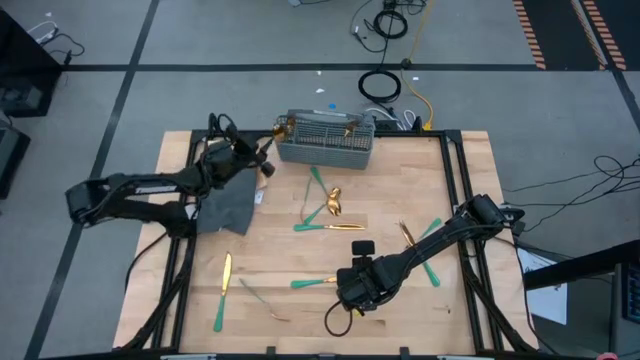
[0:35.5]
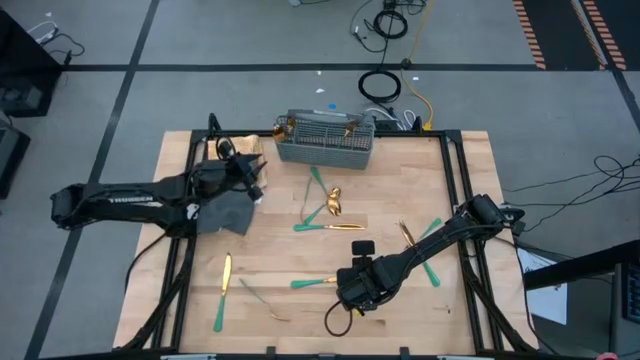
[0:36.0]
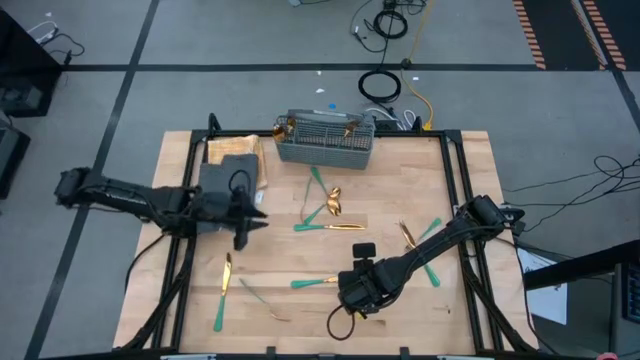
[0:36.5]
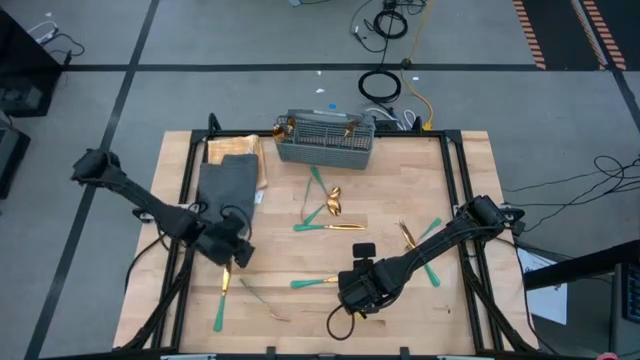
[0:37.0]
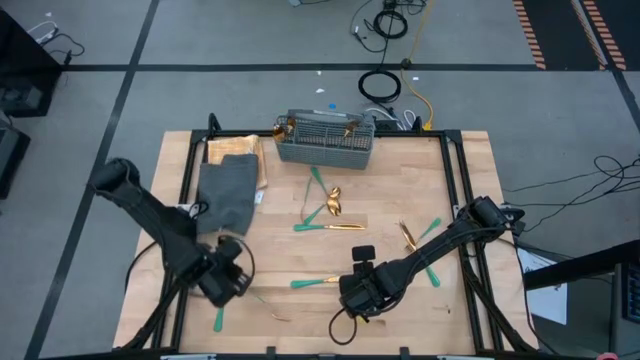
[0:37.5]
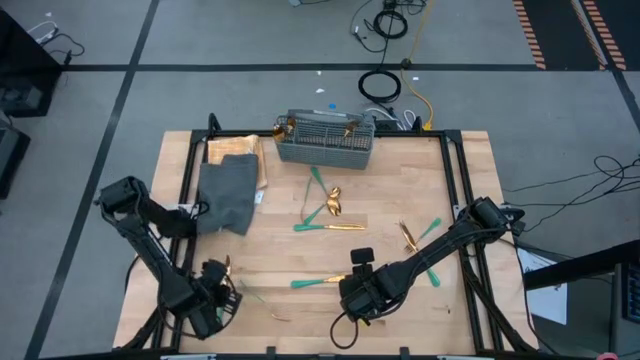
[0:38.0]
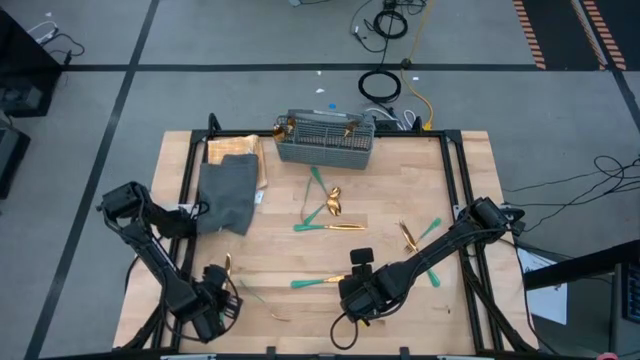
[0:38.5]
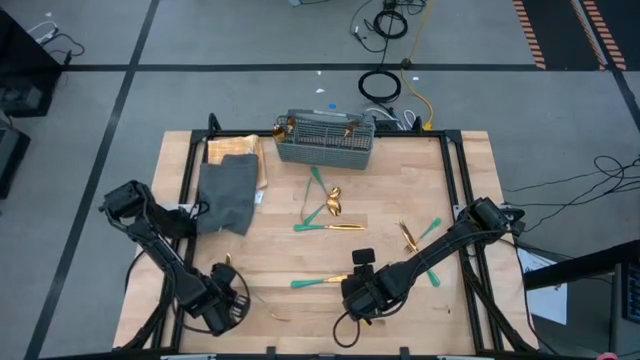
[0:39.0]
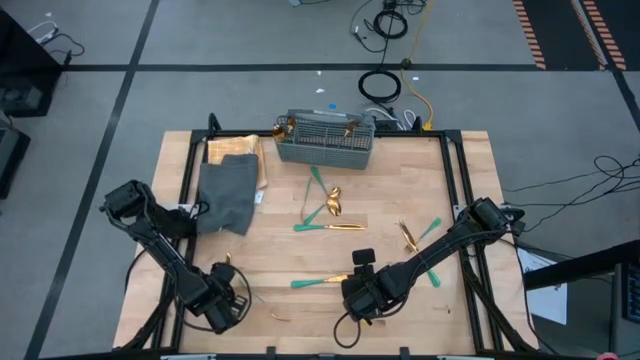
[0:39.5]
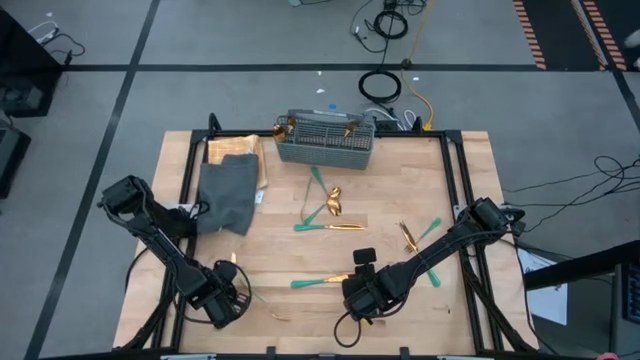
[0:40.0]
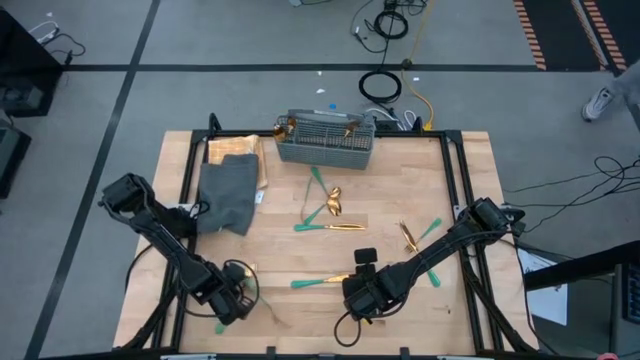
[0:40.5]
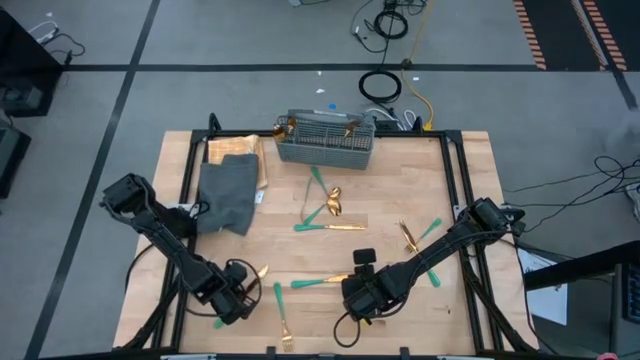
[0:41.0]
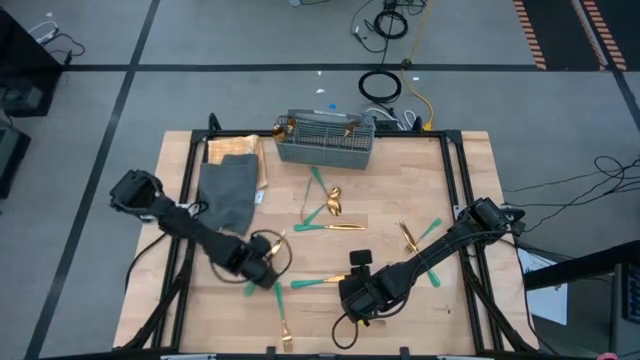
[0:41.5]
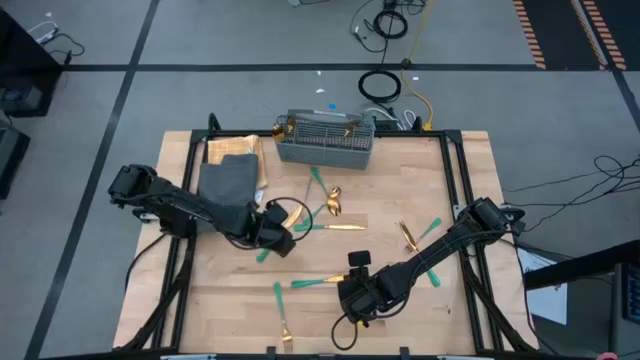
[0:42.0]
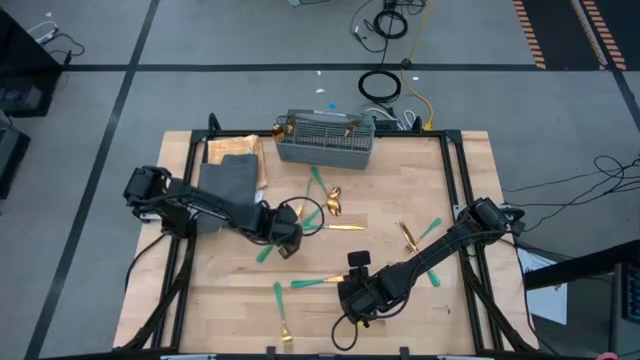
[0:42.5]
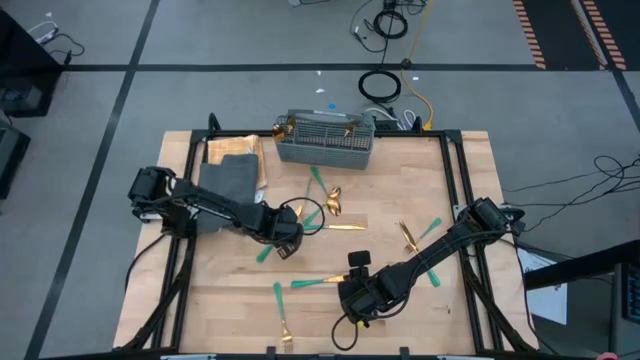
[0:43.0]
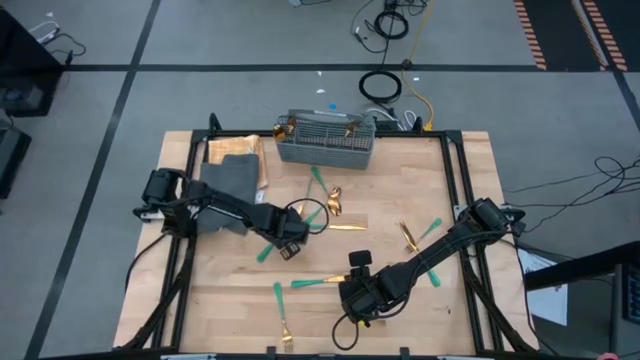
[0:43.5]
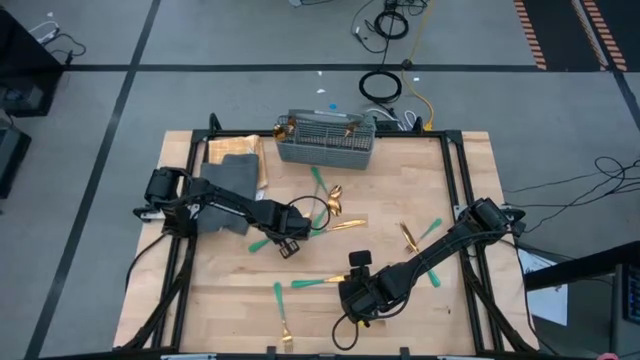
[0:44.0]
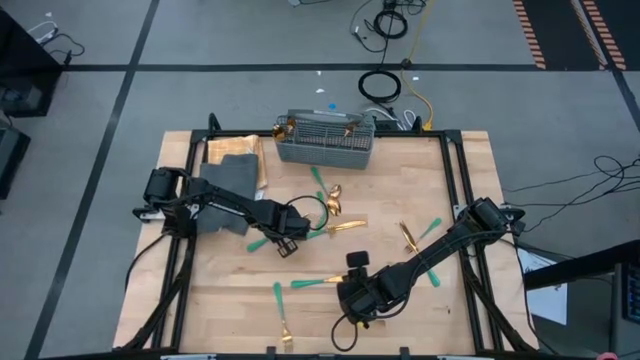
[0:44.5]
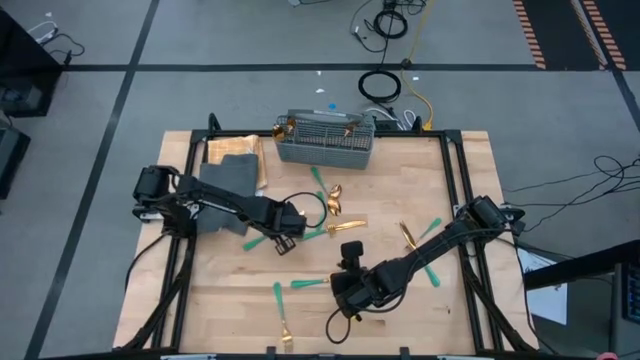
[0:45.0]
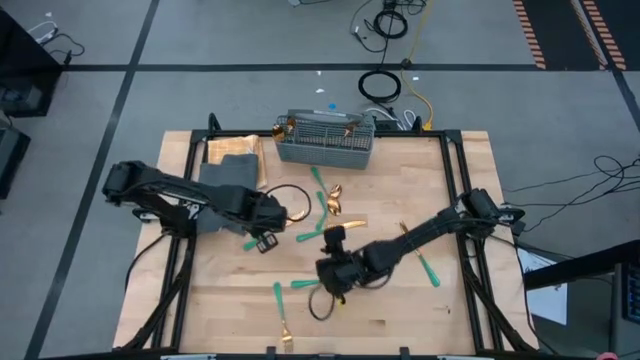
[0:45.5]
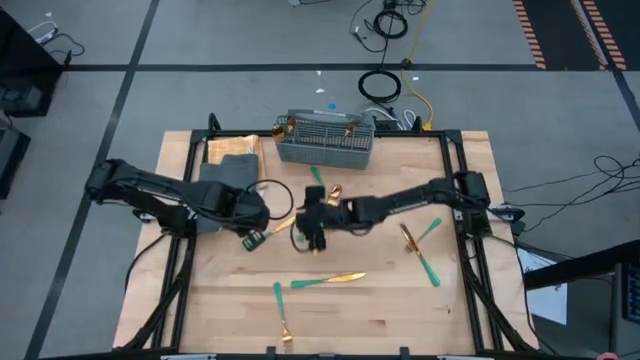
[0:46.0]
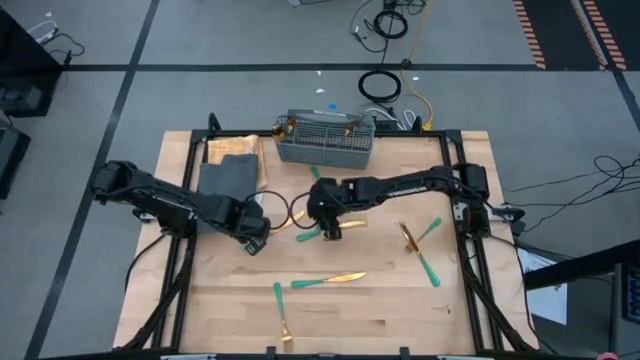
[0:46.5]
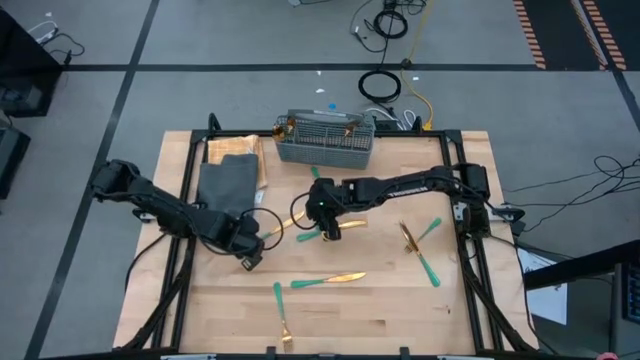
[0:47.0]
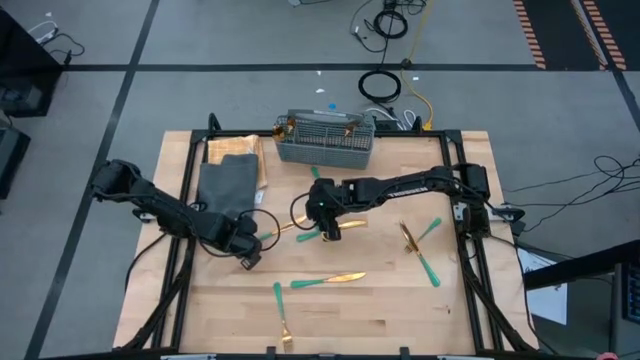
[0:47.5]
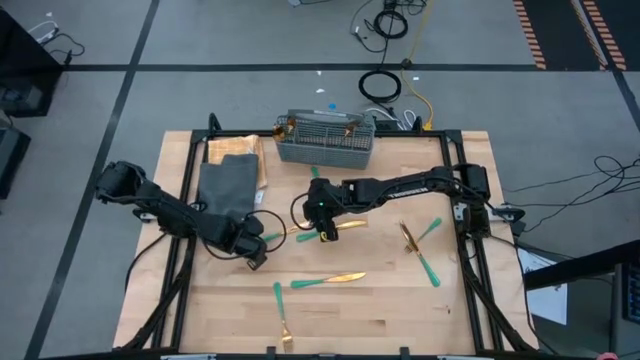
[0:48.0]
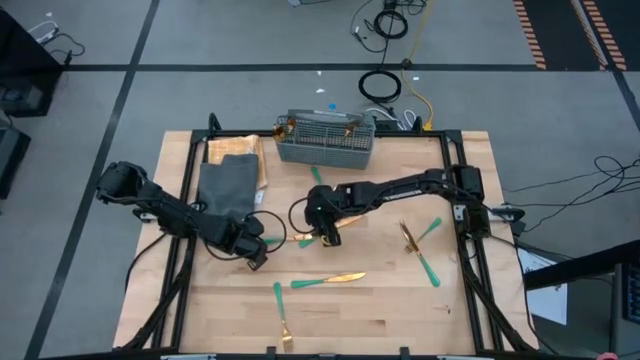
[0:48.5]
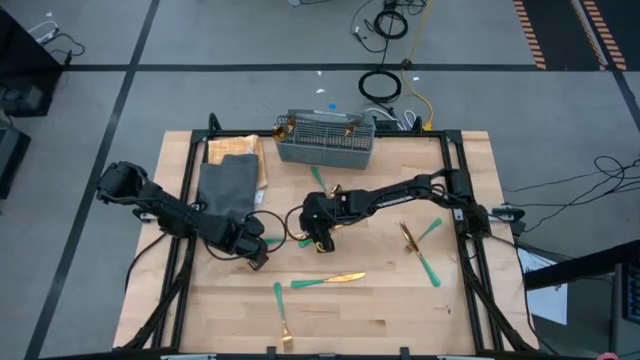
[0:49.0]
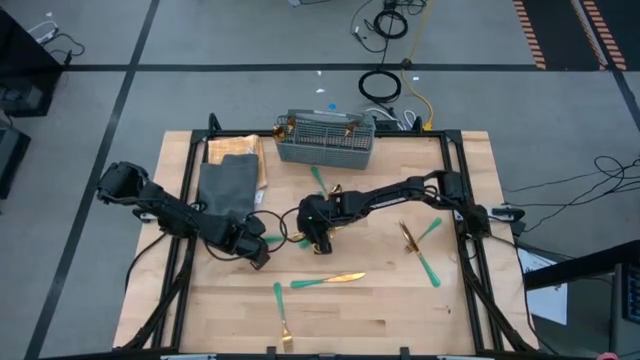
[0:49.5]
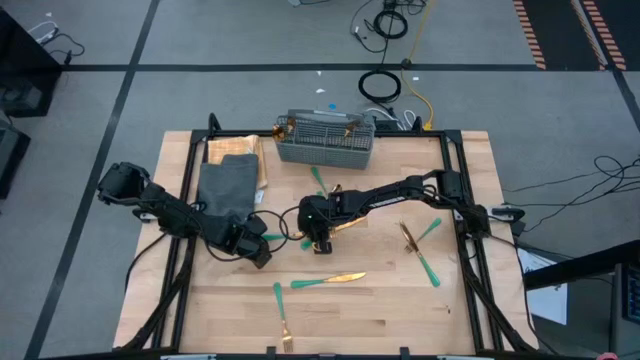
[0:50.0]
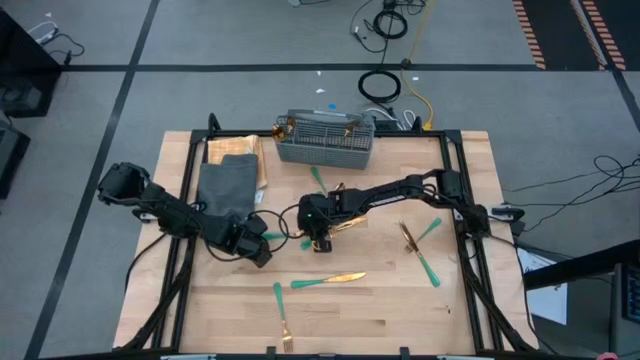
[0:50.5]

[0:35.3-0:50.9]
Task: Sort silverware
Put the green table knife into the silverware basket

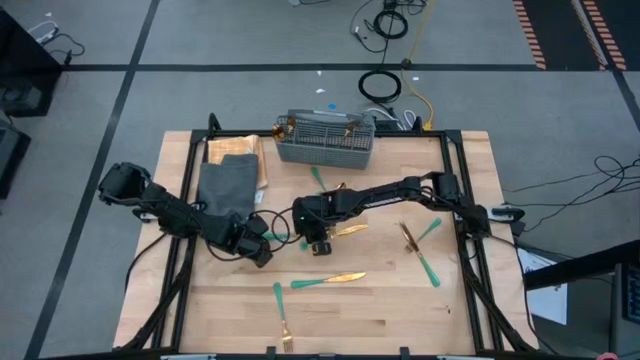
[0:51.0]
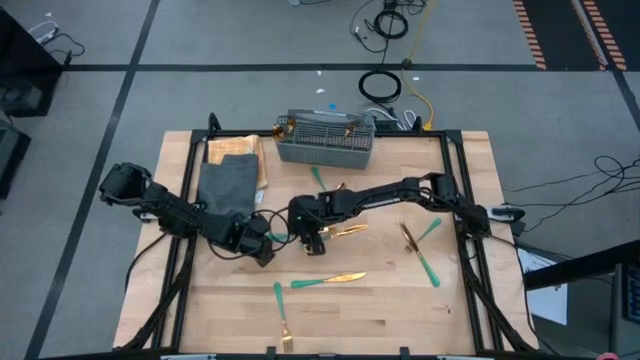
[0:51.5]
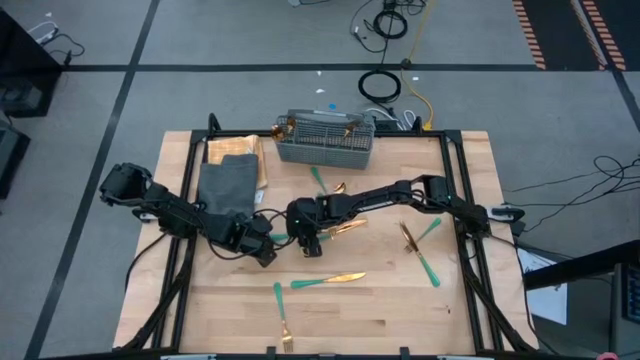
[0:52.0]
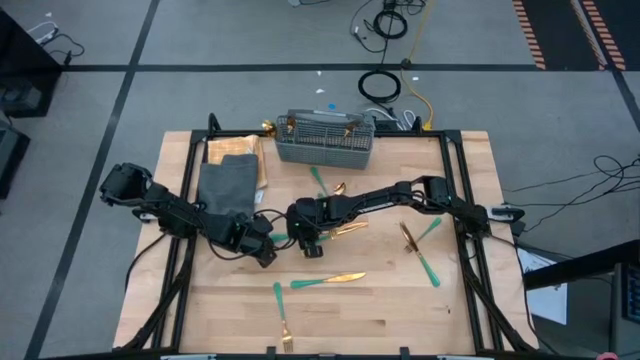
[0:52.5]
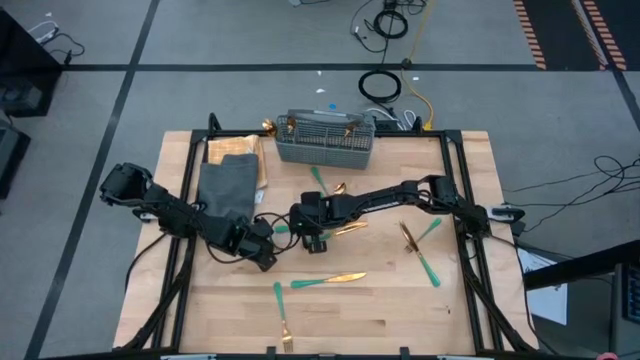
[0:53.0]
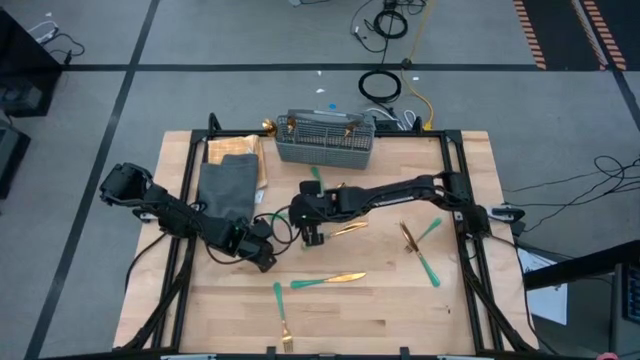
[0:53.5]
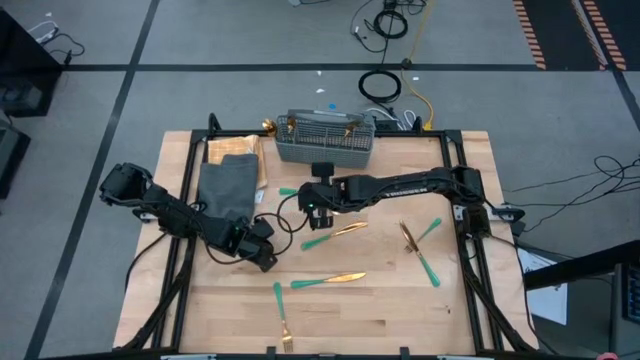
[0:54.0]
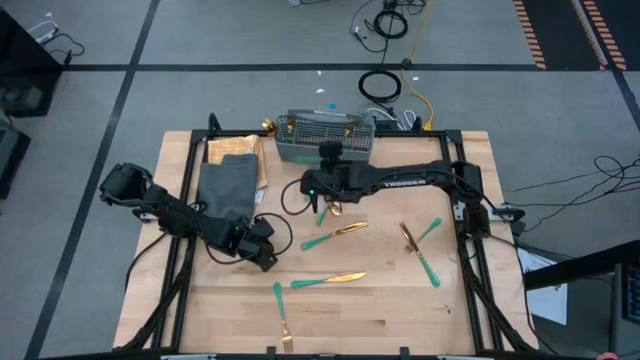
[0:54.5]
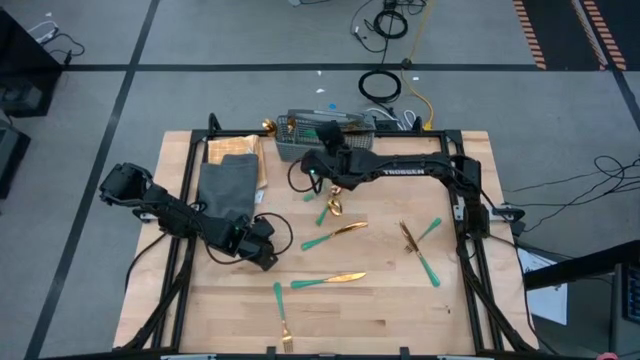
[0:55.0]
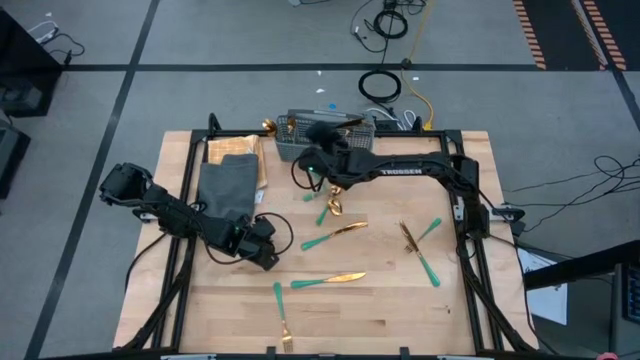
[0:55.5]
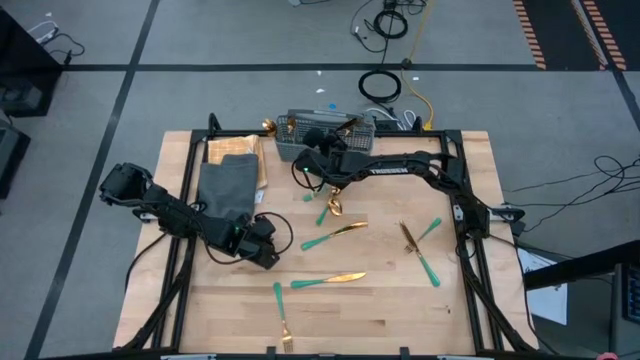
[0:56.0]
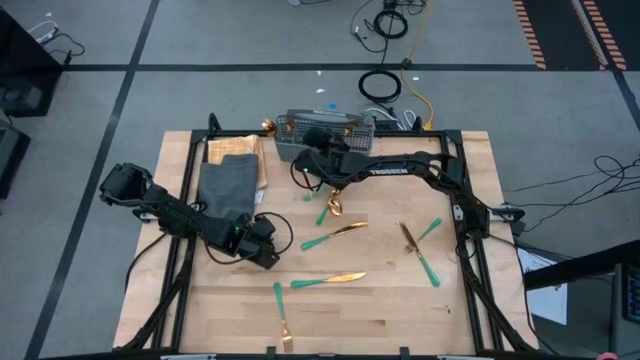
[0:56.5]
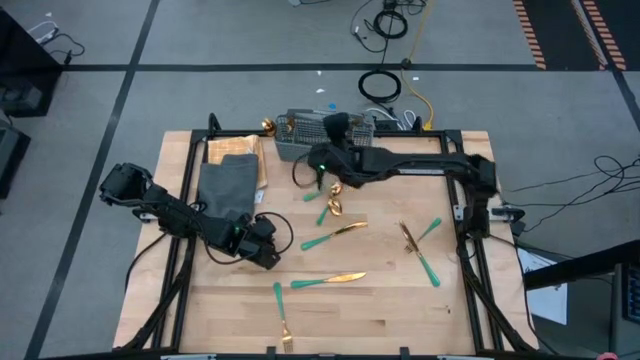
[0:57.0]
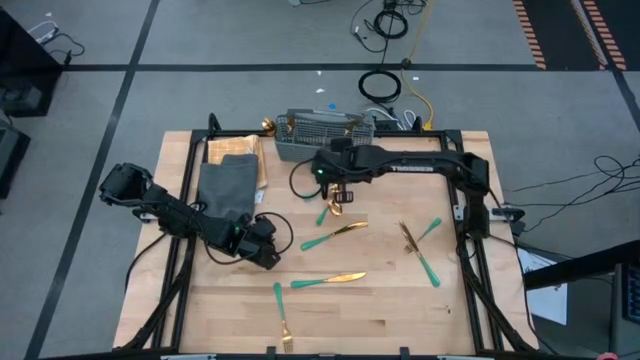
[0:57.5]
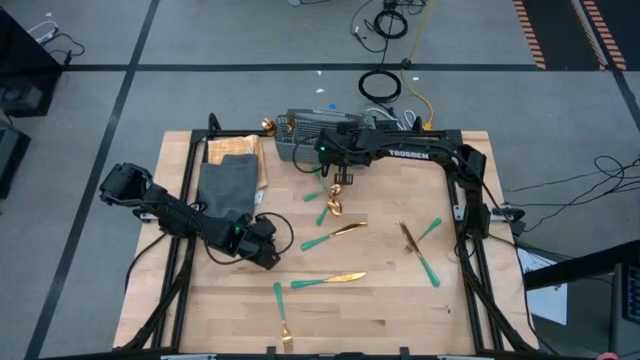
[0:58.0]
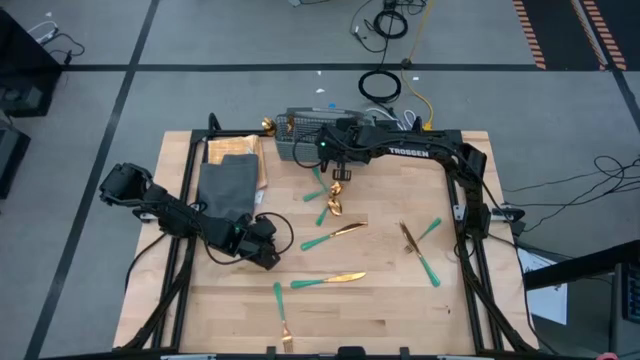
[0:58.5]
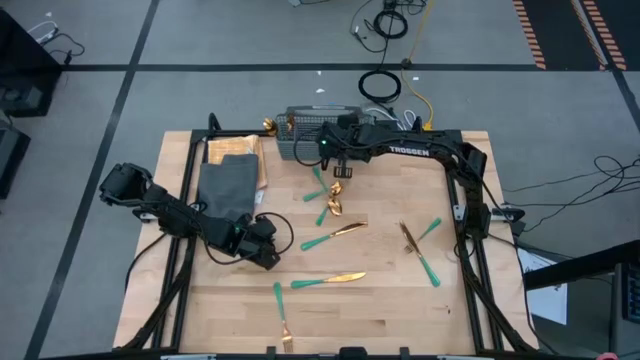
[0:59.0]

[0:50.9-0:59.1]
Put the green table knife into the silverware basket
